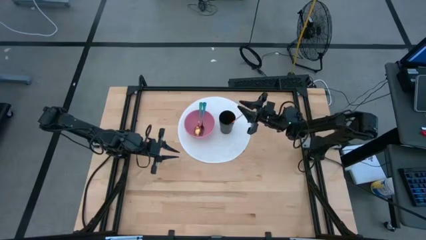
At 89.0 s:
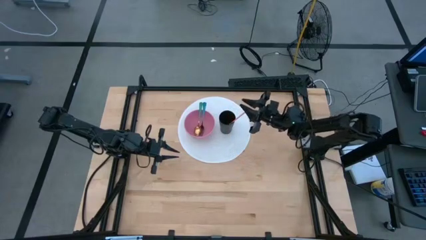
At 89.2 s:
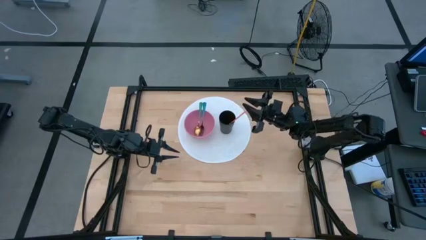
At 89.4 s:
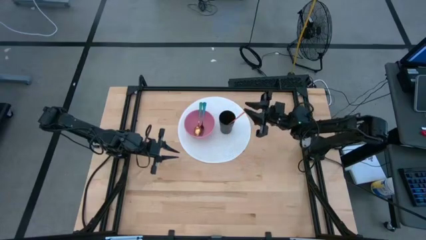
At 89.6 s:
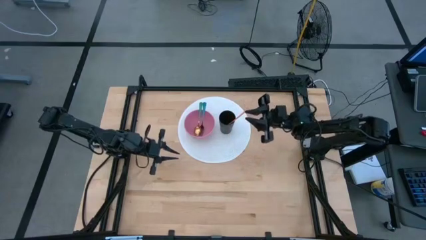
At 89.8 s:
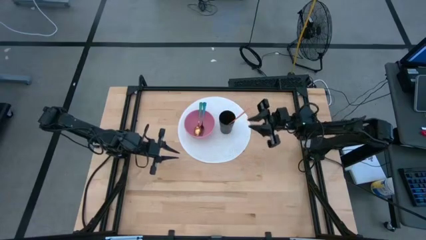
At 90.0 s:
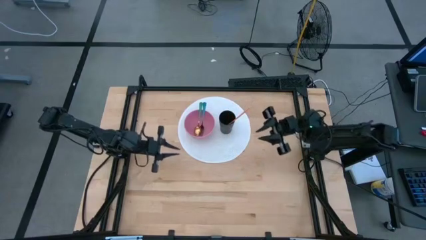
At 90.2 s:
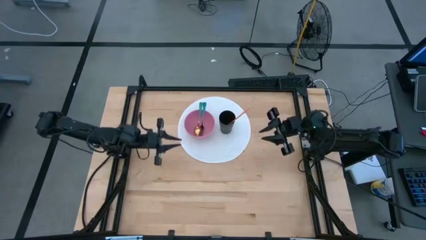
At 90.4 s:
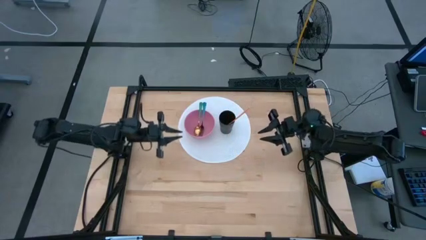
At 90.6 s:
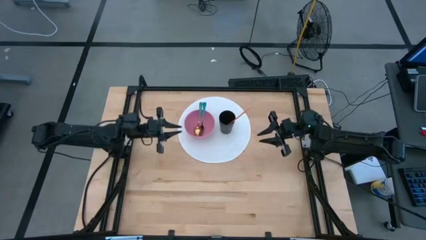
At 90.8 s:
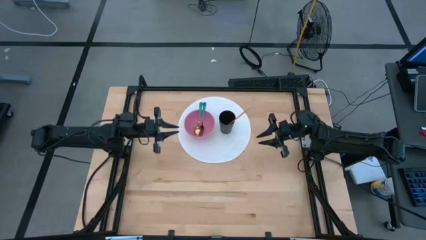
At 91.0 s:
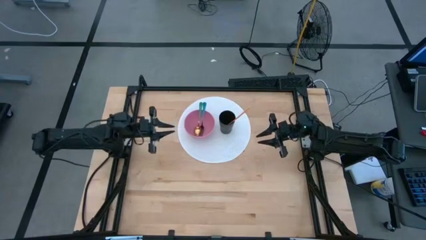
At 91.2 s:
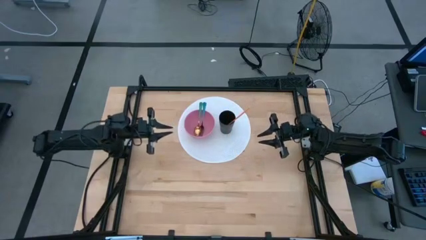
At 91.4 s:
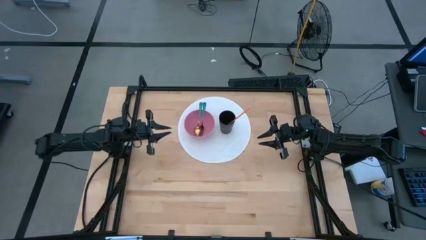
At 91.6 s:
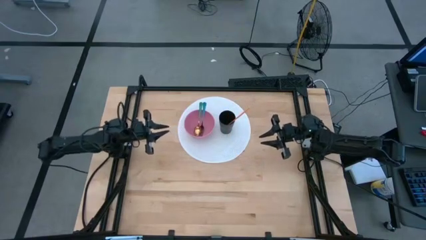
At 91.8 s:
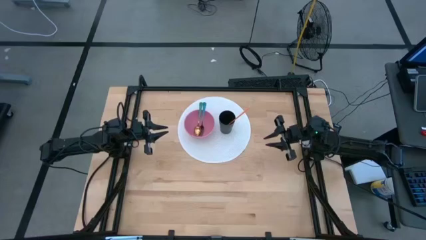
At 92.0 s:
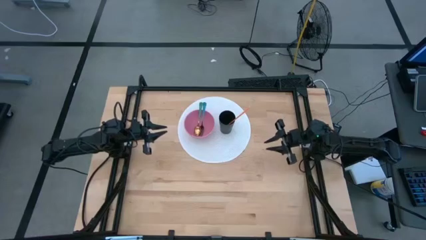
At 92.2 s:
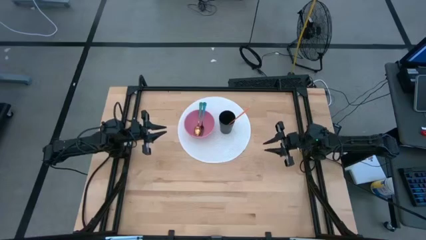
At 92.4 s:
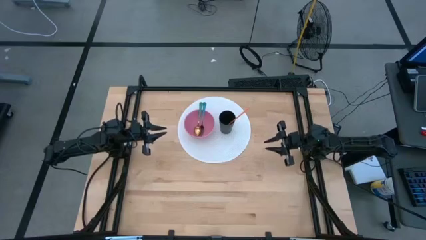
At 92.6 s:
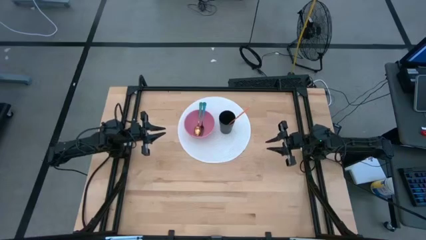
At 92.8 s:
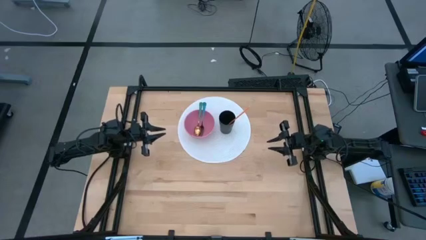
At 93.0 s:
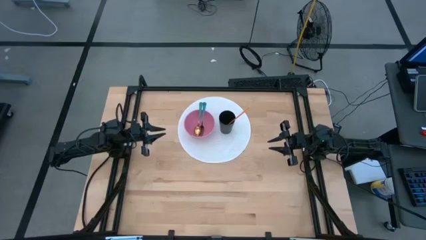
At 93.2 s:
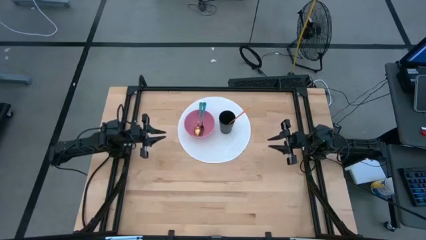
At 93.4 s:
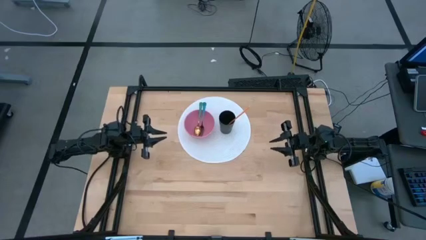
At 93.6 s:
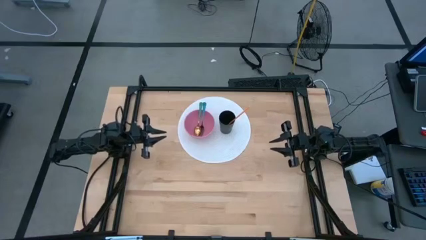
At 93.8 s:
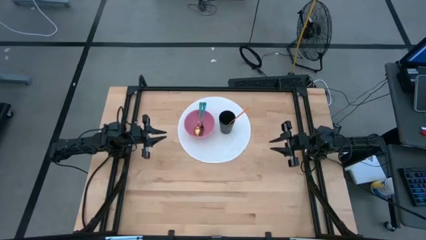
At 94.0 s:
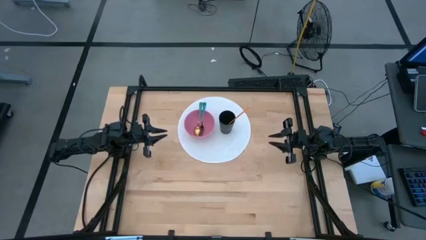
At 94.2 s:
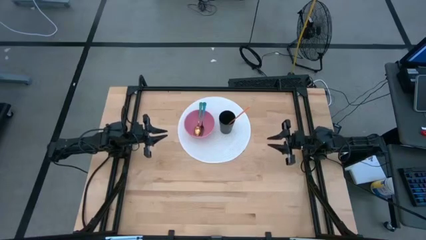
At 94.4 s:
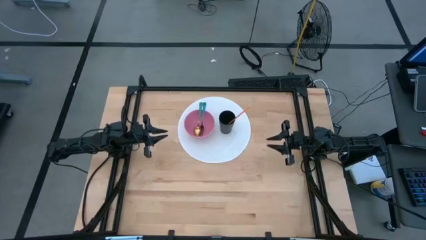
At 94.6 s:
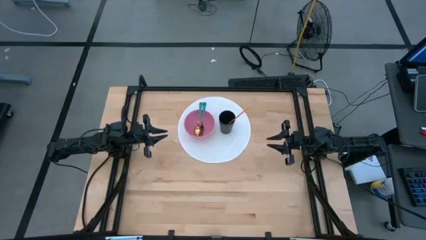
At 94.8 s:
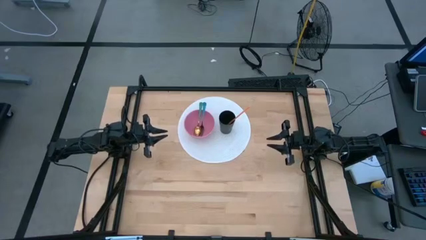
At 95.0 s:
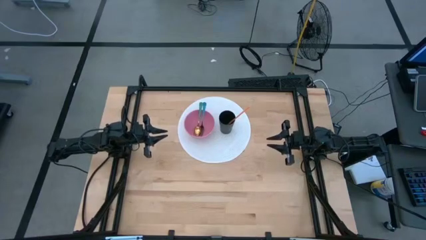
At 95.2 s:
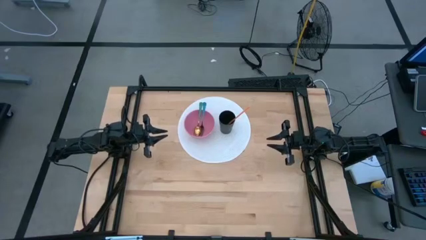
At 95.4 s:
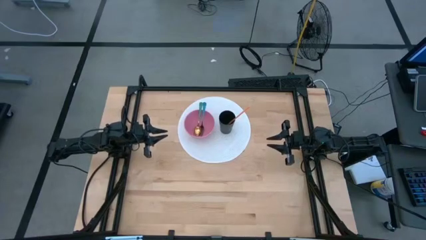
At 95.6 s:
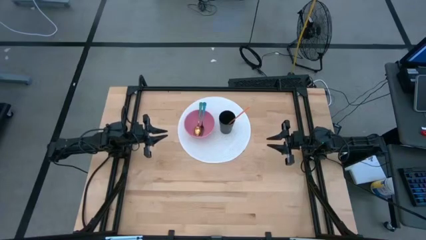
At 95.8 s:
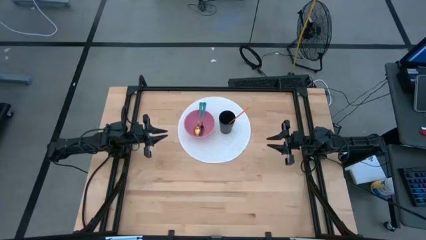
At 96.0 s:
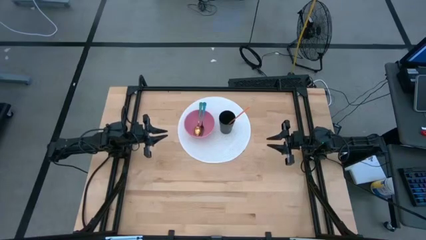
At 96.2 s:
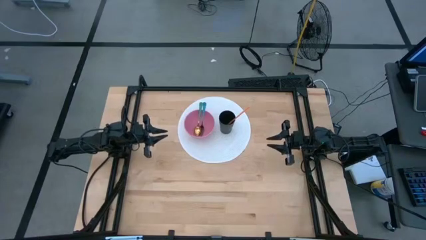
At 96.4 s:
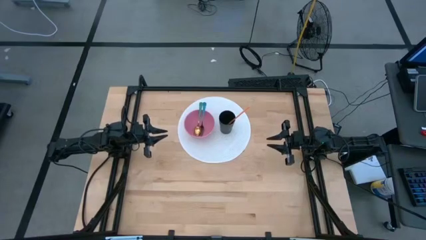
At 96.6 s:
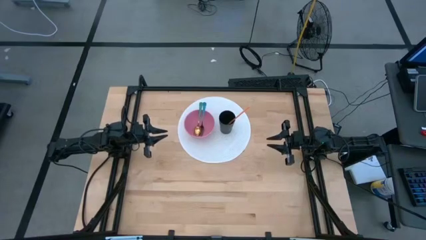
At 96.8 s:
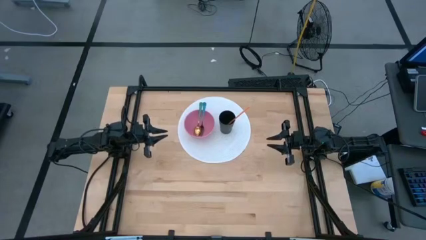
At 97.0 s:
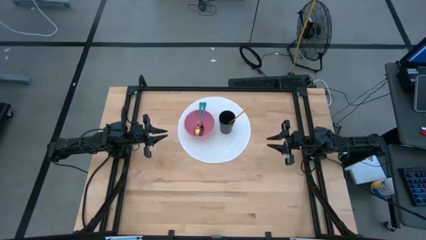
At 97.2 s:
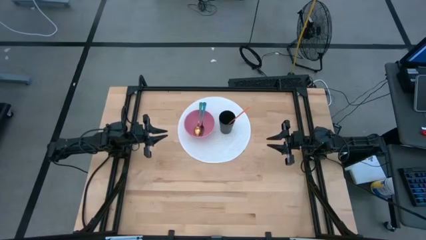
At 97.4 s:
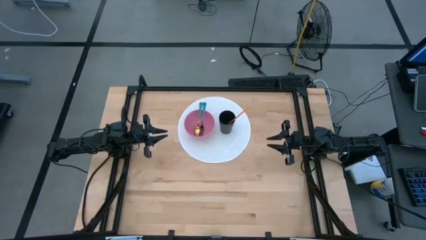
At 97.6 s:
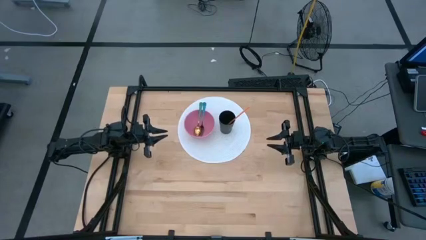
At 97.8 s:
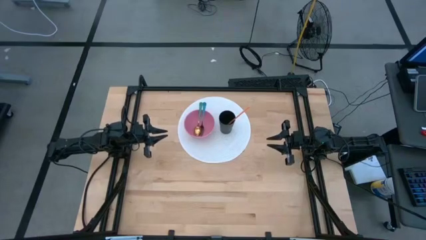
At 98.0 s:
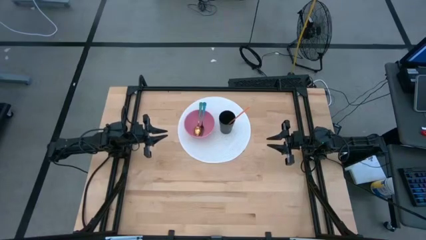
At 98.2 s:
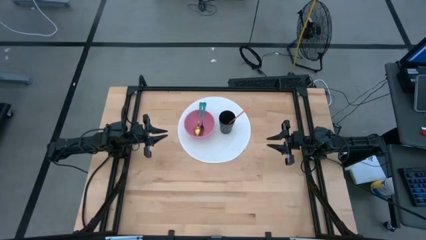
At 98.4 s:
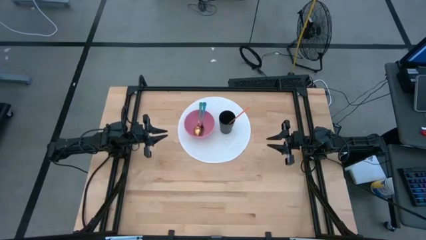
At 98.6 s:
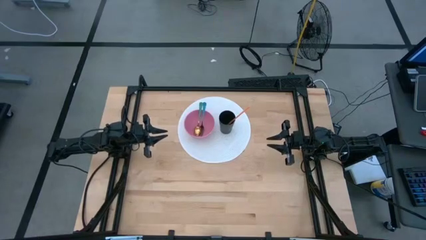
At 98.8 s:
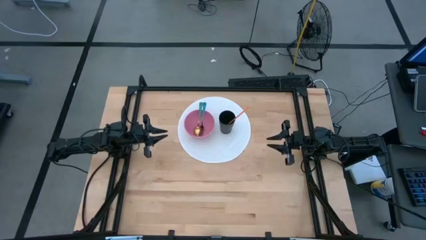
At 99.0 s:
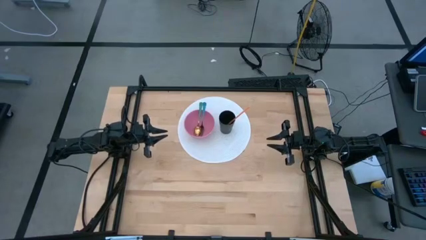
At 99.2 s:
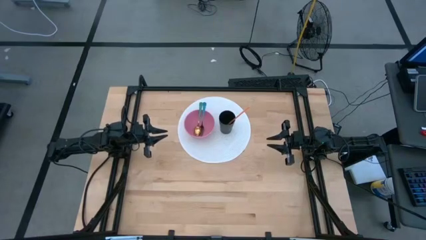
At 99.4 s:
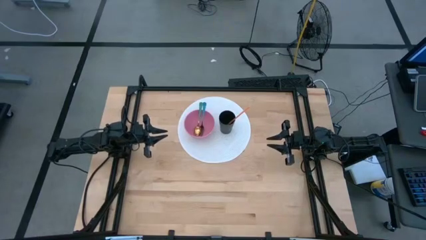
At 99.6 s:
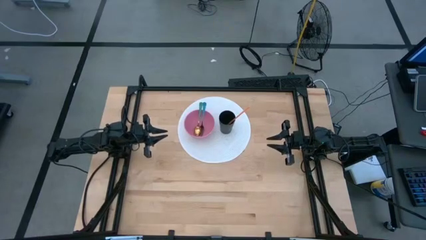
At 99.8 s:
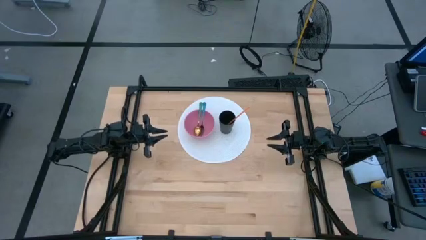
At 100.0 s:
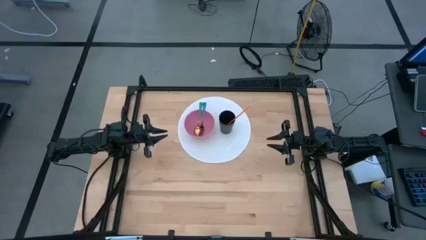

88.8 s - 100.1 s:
Task: Pick & Place Utensil
Return to Home Position

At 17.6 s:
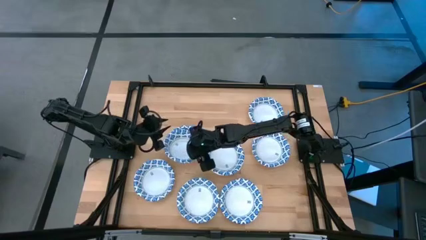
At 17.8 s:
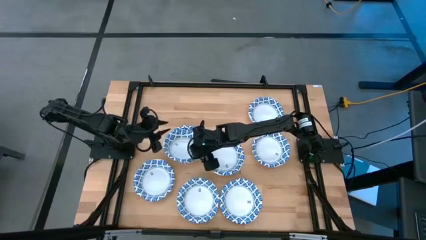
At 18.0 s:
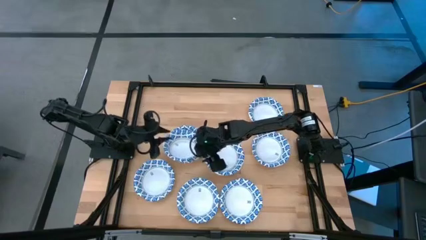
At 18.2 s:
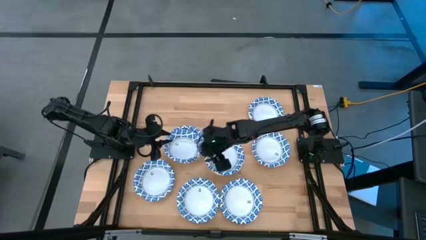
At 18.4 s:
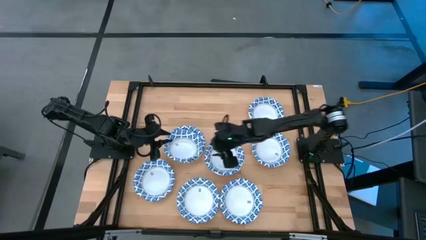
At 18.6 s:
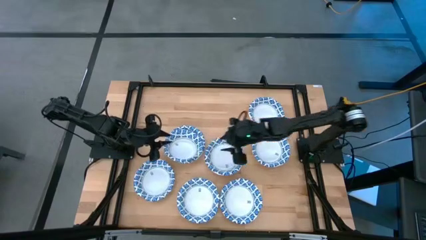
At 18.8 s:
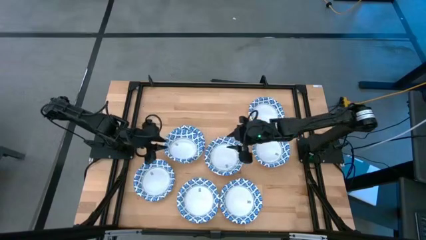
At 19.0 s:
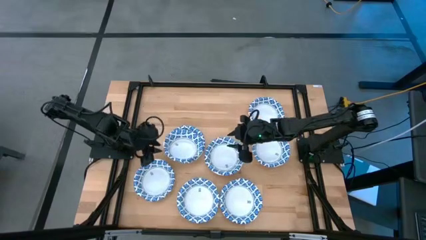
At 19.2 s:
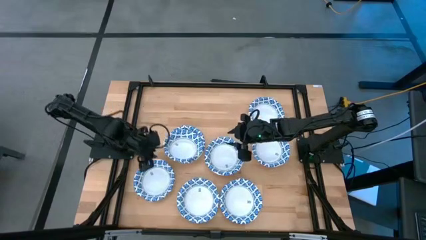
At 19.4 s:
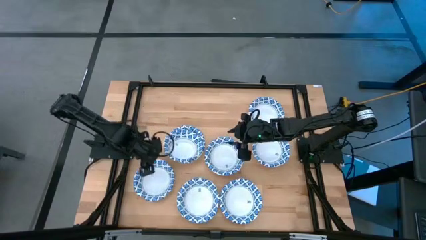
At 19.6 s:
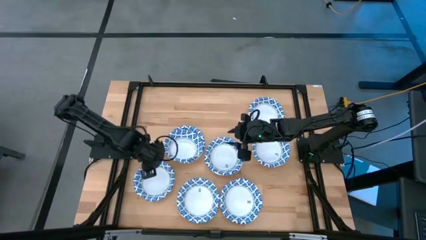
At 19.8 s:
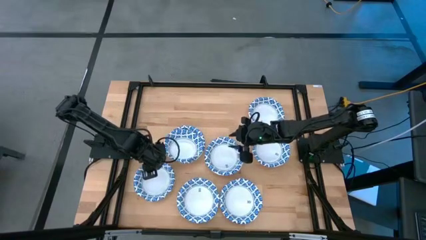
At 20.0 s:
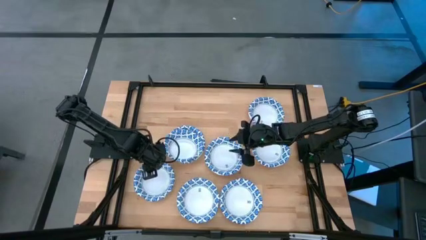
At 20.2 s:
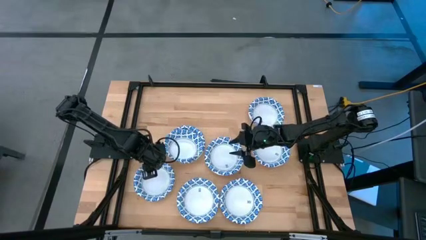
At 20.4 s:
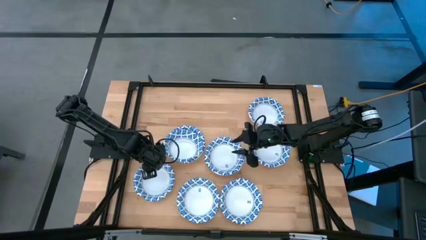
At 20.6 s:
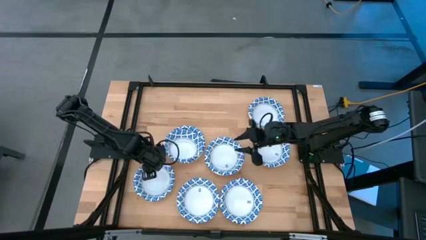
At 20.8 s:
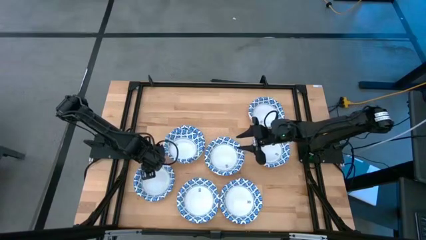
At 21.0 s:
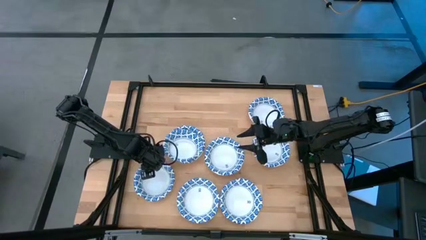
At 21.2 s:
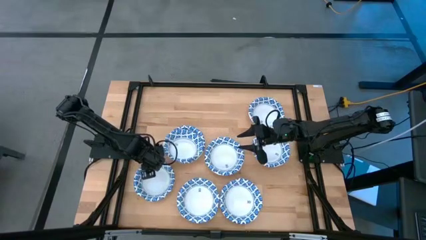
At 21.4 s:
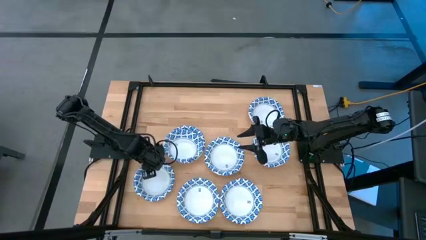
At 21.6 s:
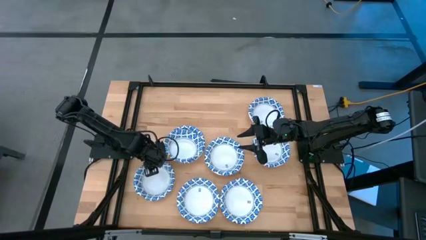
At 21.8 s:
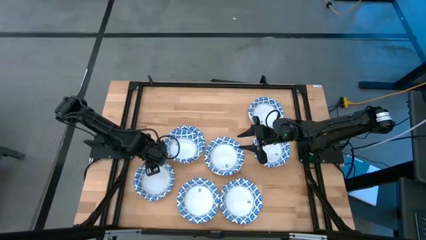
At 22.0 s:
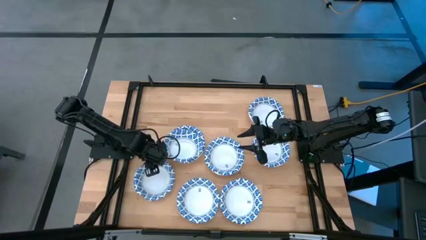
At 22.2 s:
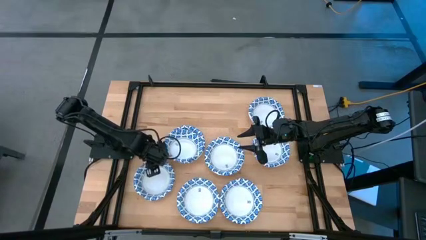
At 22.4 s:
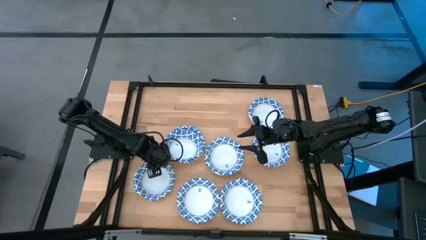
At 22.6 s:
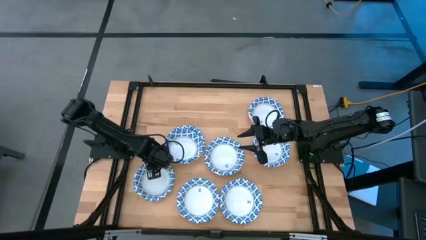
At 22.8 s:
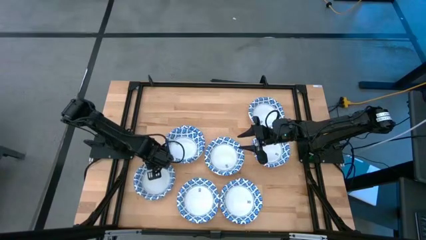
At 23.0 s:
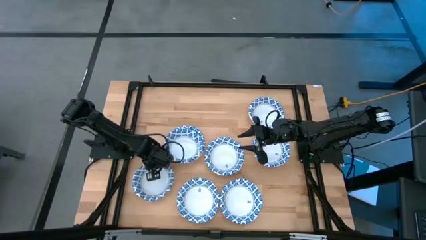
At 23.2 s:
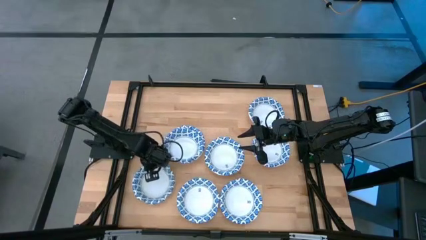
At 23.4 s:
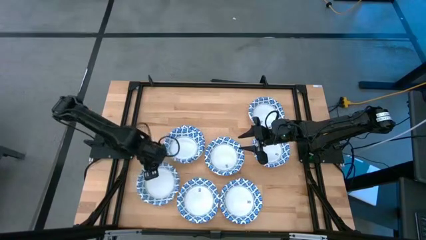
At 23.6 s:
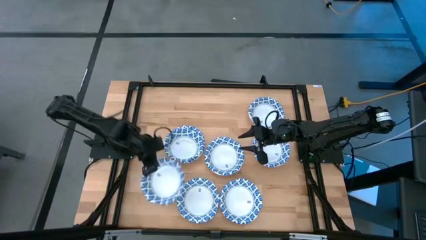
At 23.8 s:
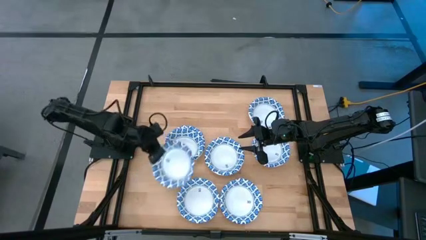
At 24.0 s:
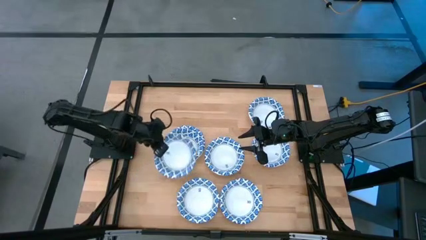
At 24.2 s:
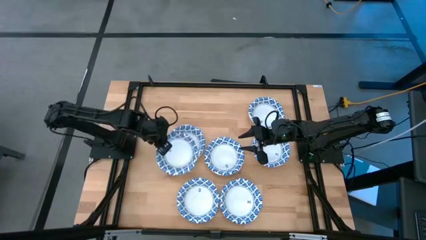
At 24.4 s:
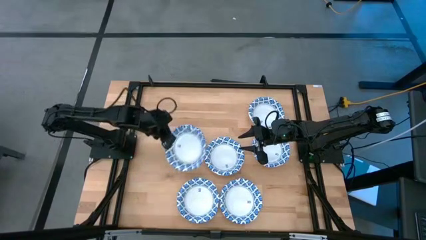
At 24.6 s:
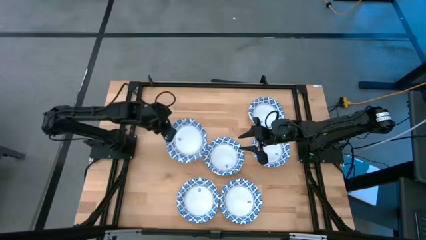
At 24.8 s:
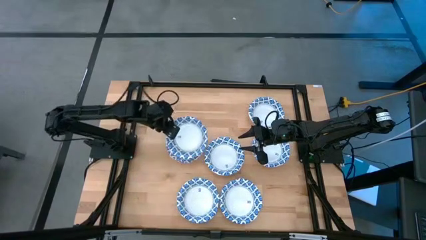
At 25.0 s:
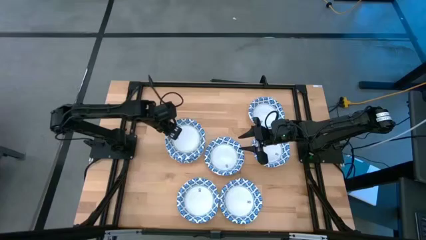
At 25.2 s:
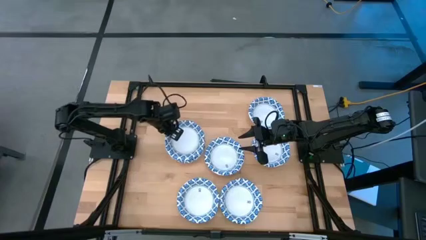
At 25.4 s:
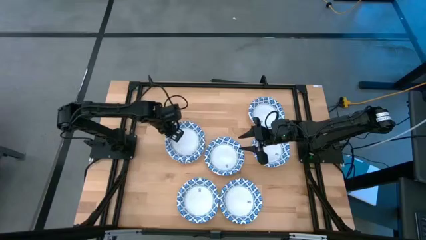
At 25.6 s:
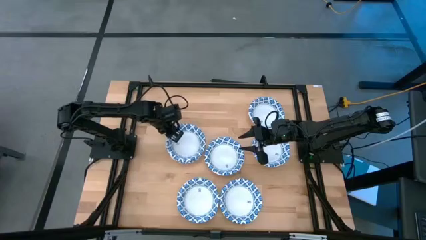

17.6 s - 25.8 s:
Task: Nest bowls inside each other
Stack the white bowl on the white bowl
